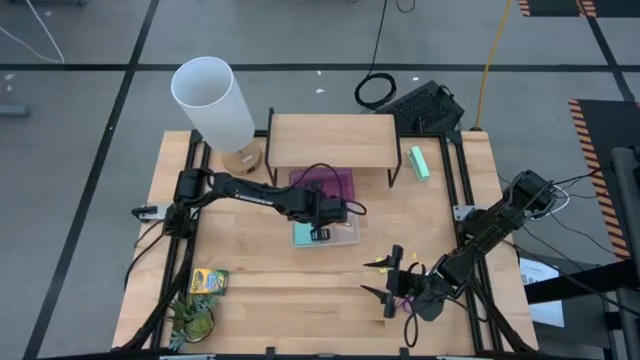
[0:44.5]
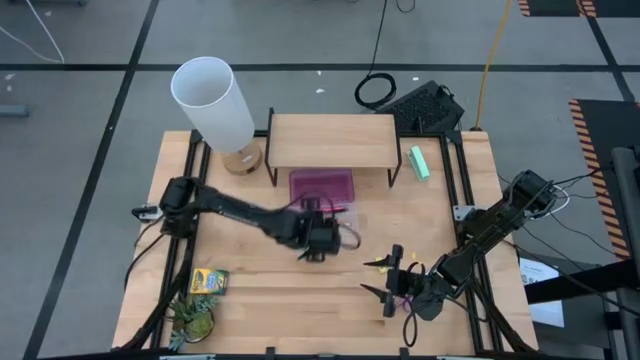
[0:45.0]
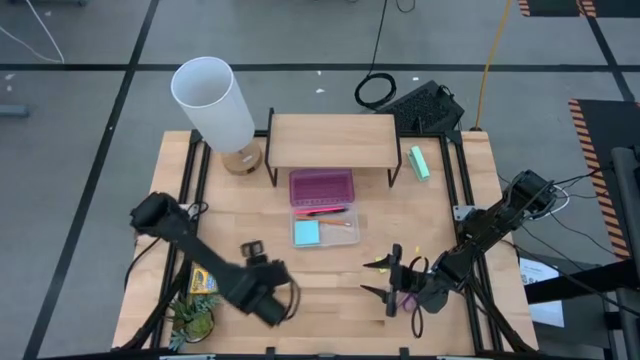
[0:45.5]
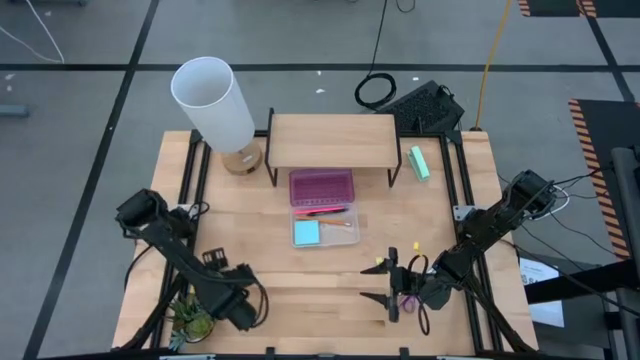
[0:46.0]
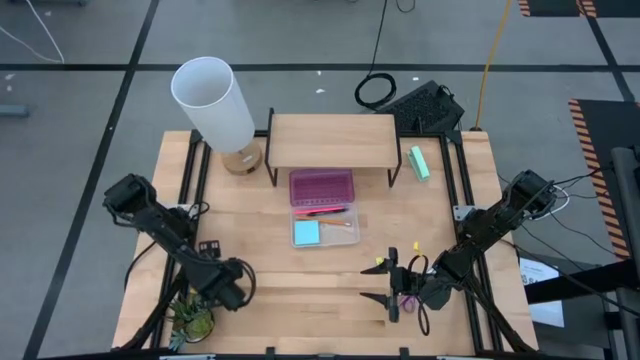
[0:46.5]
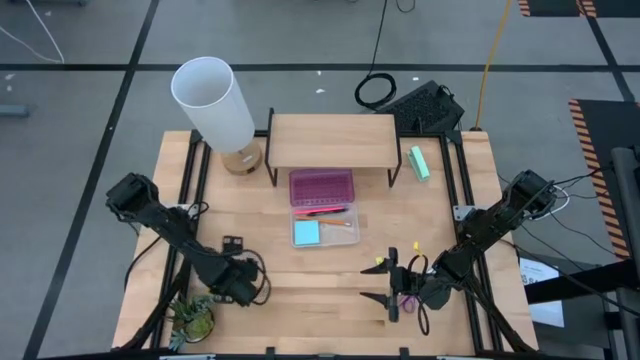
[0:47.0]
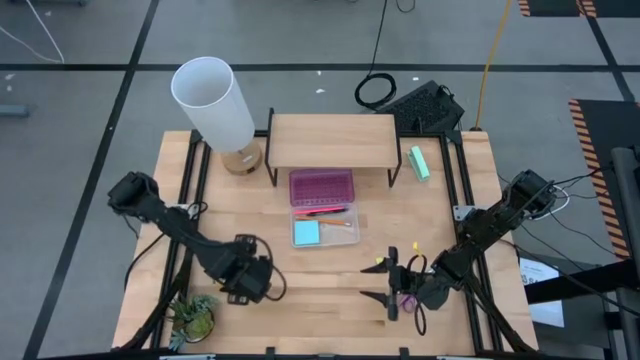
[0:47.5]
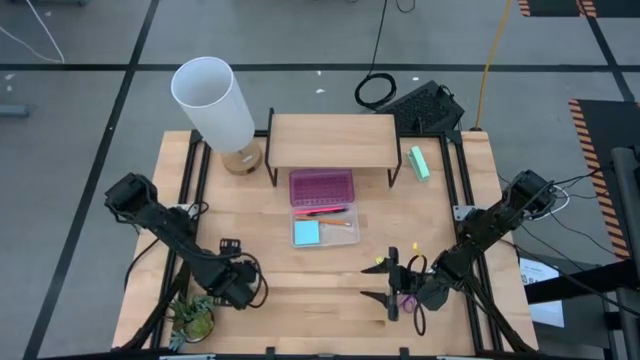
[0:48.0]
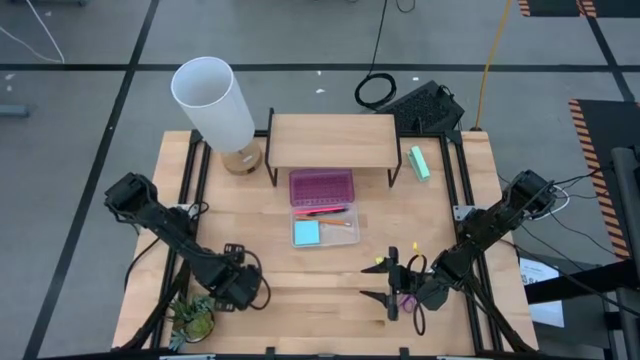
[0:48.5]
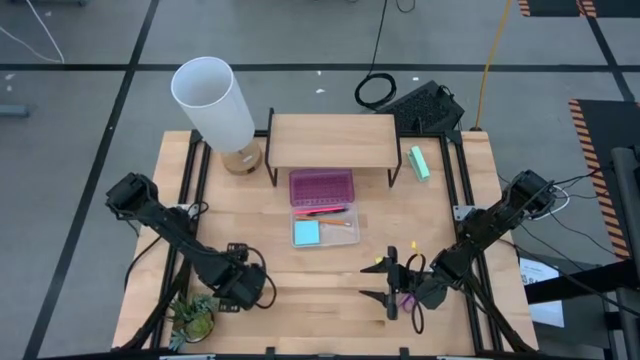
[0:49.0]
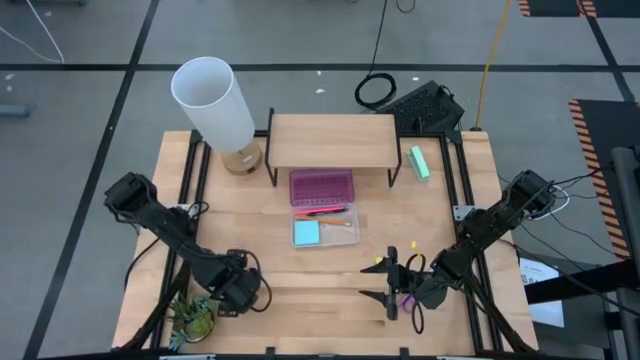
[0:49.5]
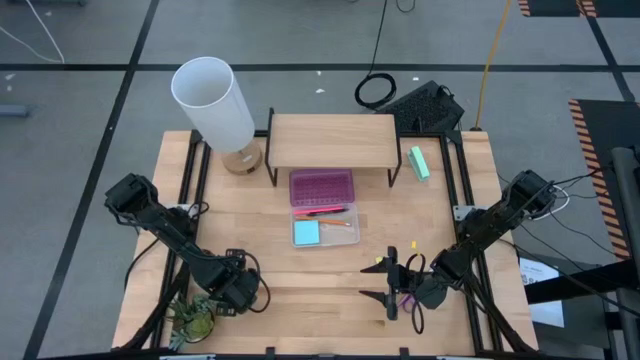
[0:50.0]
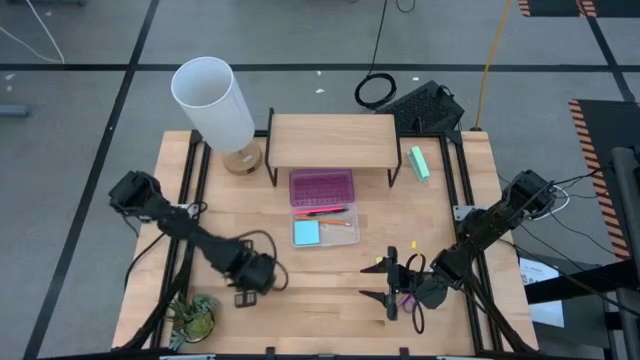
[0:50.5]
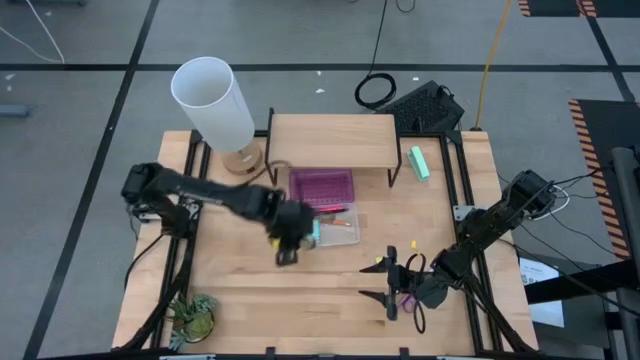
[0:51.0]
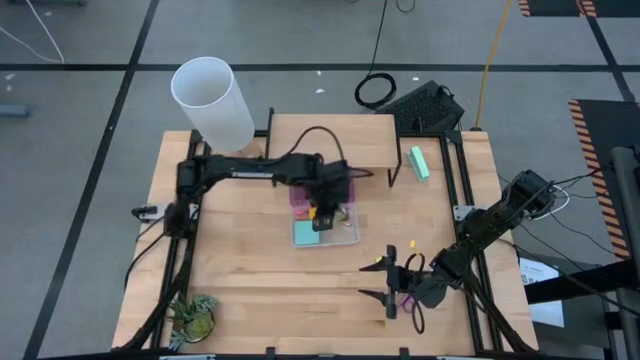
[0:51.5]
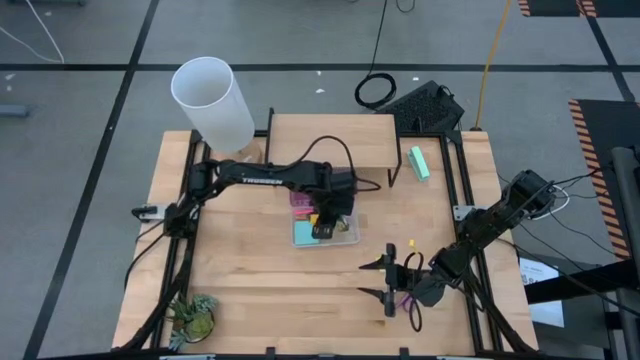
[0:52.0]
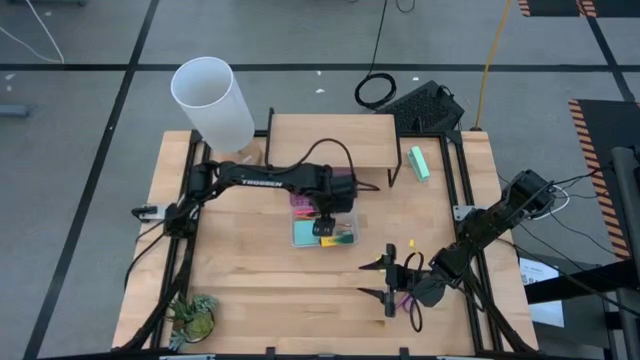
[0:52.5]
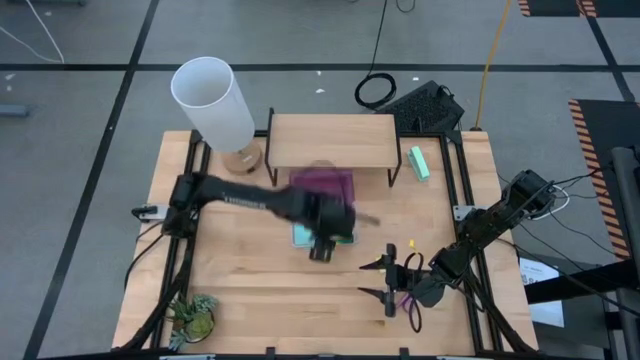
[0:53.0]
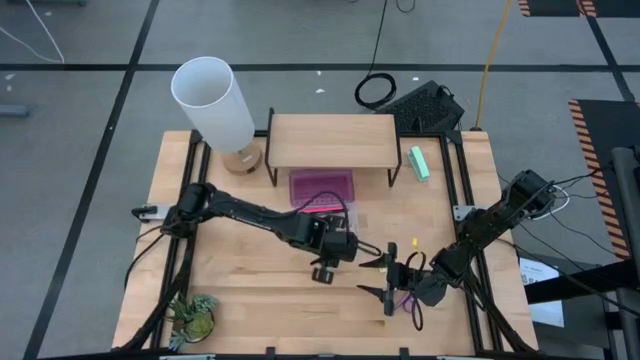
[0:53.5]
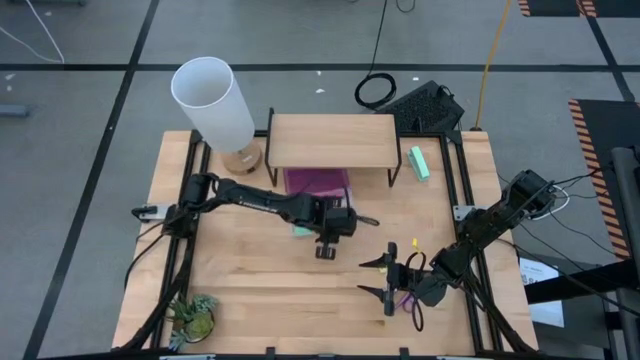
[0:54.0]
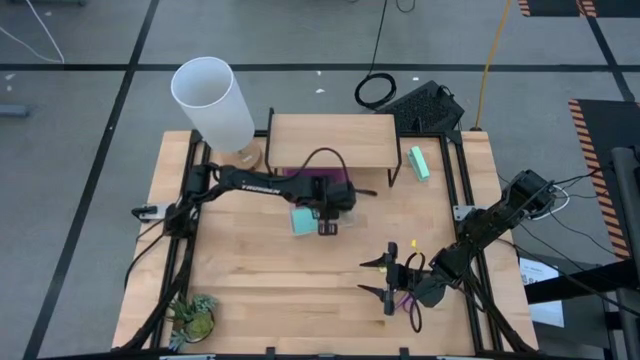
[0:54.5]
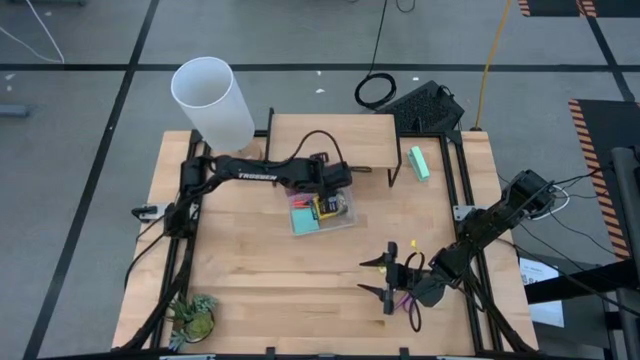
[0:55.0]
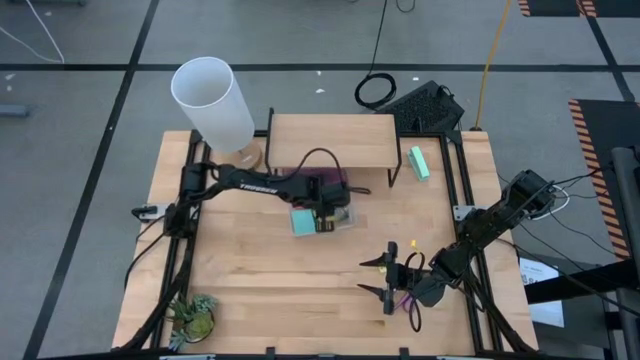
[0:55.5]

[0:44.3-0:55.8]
Task: Pack school essentials
Put the crayon box into the violet supply box

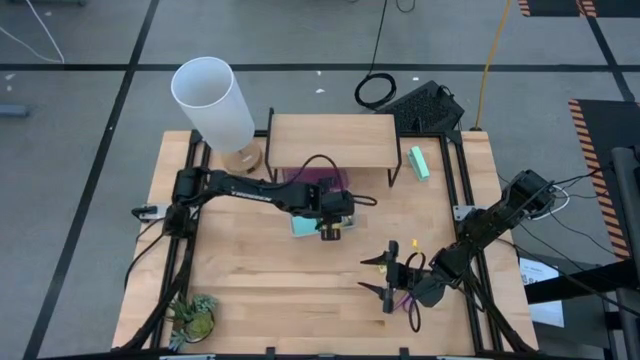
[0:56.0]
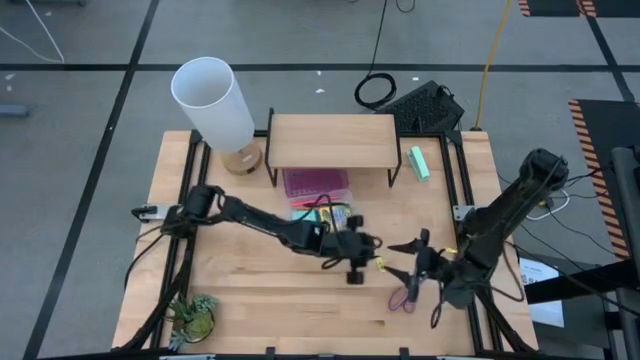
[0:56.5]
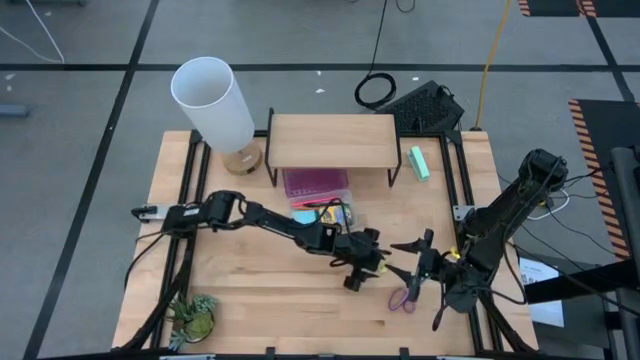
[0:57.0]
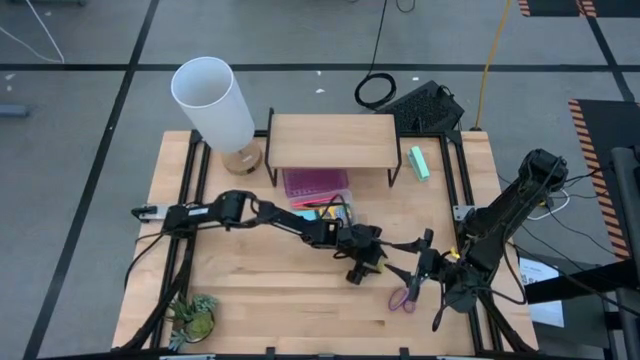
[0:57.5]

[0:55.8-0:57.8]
Put the yellow eraser into the violet supply box

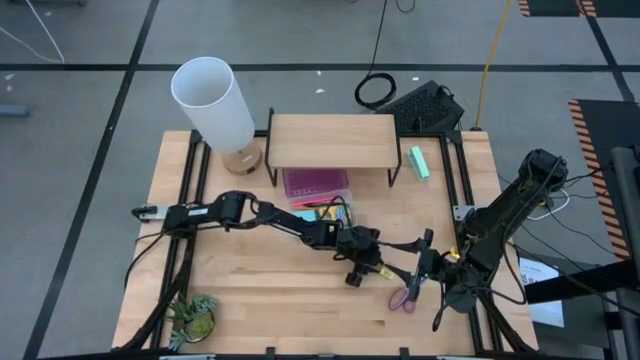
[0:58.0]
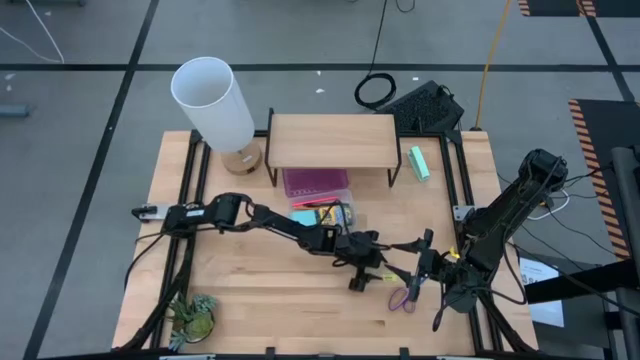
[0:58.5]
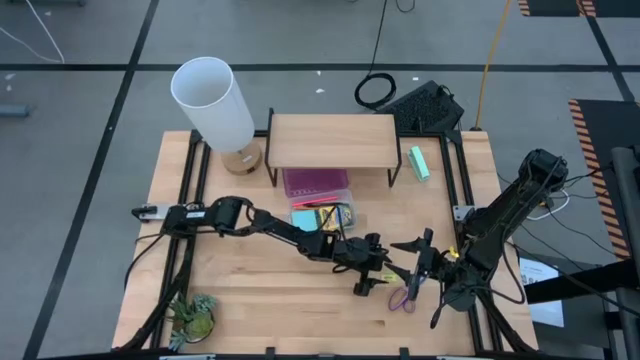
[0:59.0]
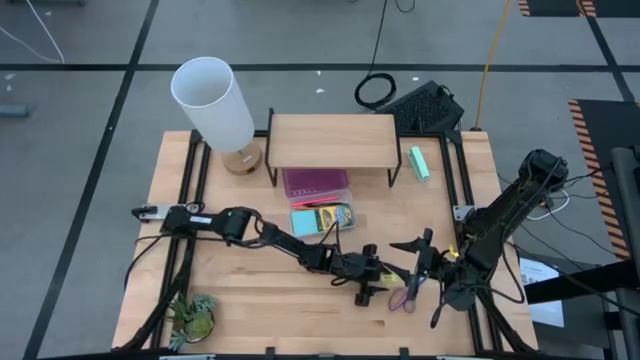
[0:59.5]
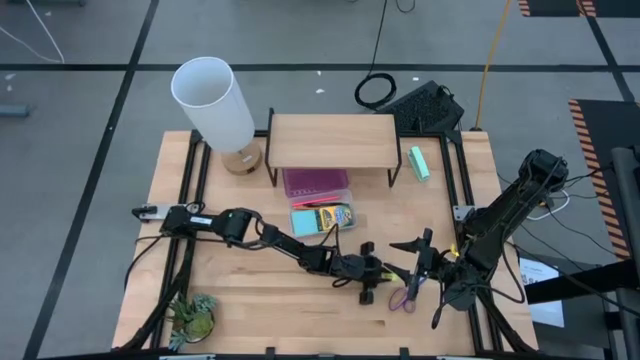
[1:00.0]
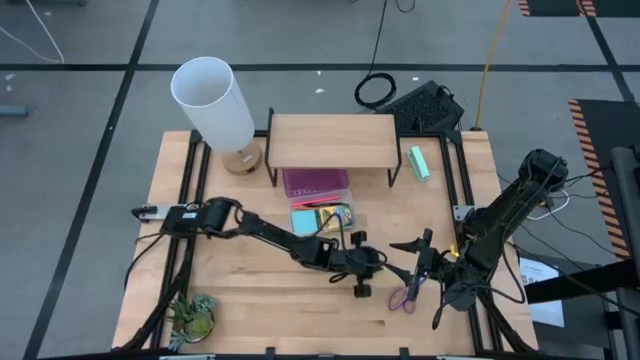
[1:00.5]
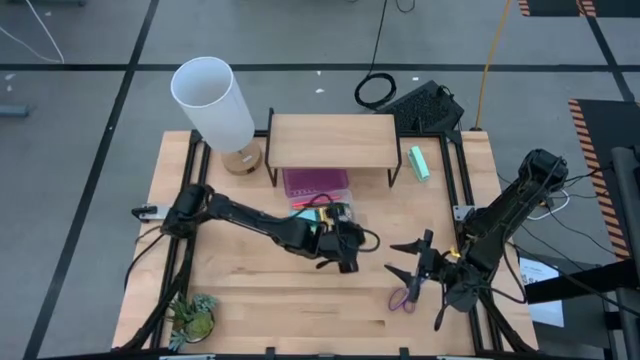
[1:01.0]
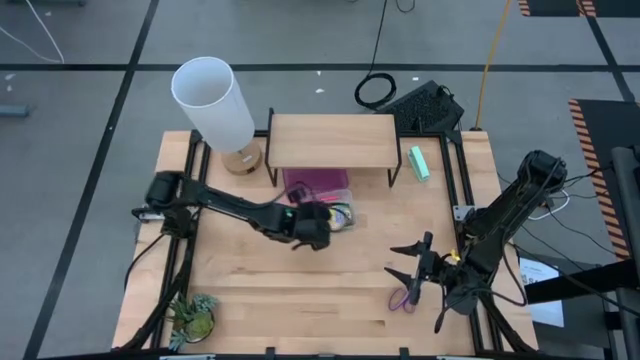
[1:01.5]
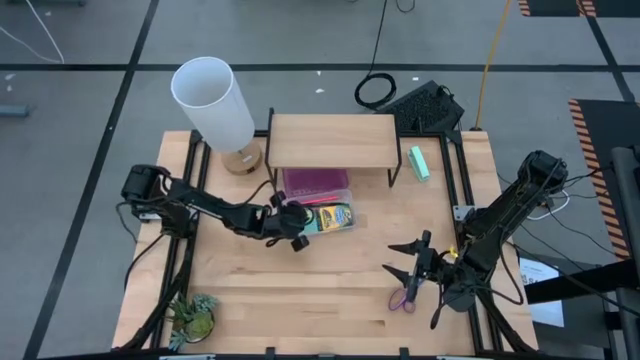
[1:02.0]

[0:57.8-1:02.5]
Put the yellow eraser into the violet supply box
